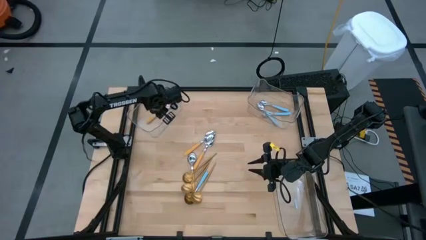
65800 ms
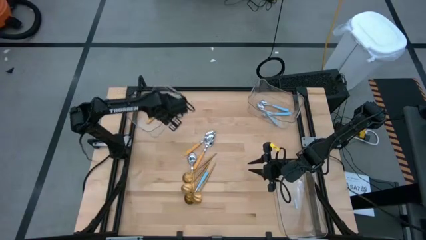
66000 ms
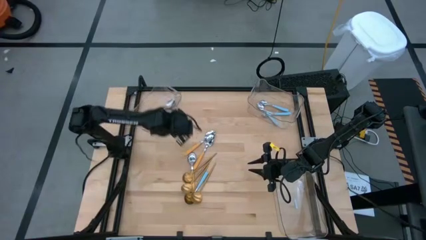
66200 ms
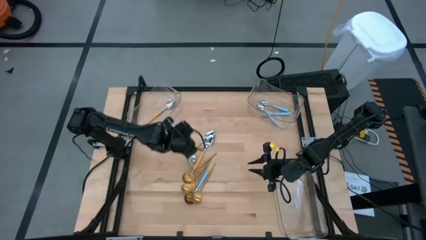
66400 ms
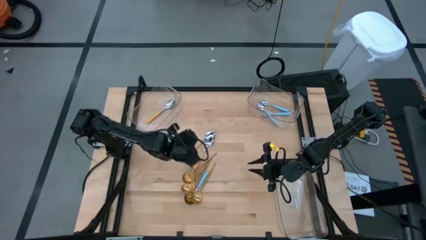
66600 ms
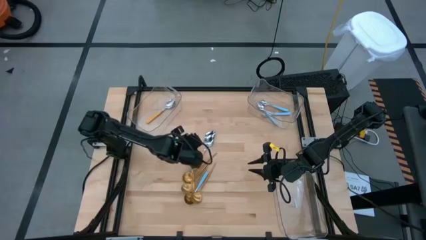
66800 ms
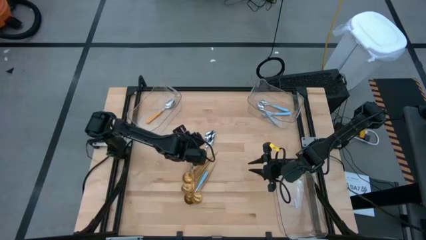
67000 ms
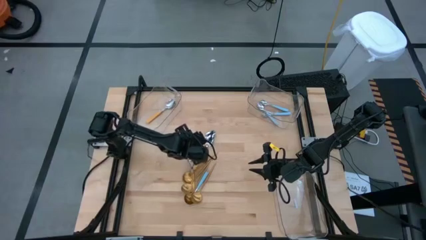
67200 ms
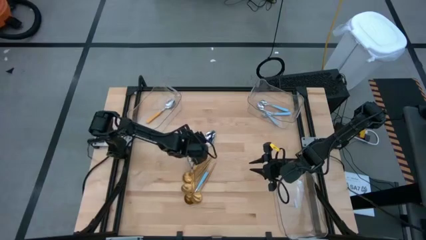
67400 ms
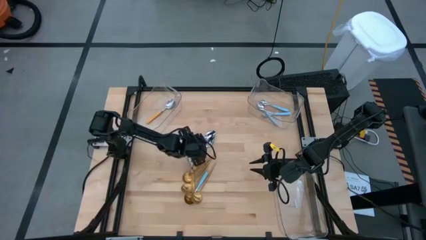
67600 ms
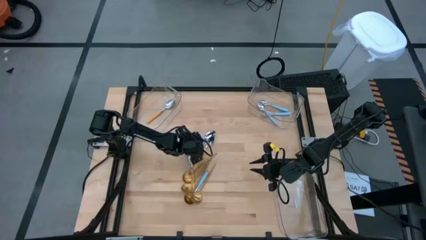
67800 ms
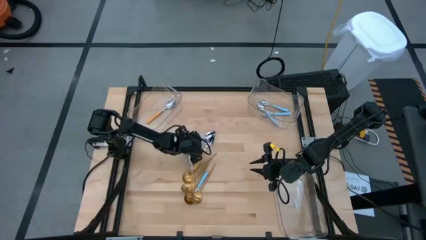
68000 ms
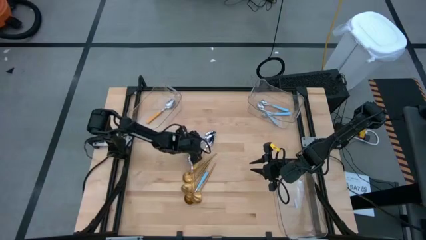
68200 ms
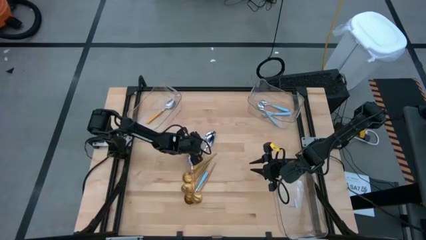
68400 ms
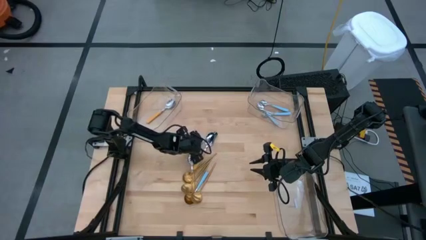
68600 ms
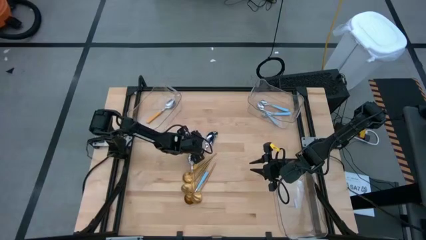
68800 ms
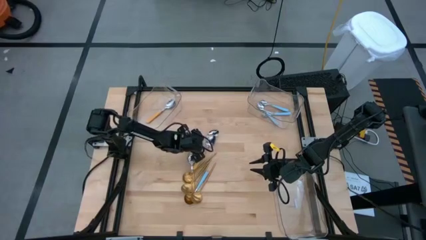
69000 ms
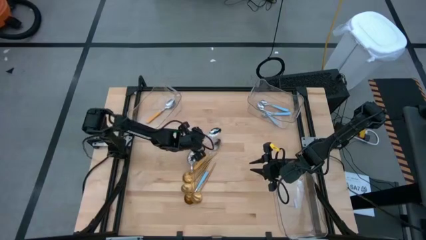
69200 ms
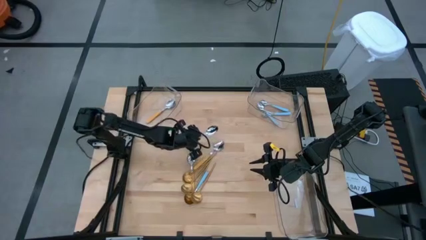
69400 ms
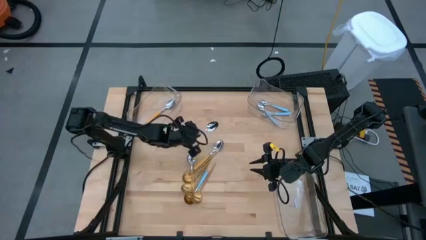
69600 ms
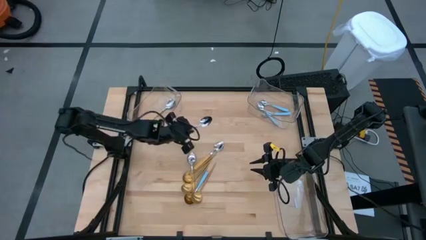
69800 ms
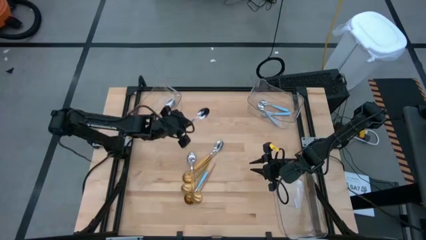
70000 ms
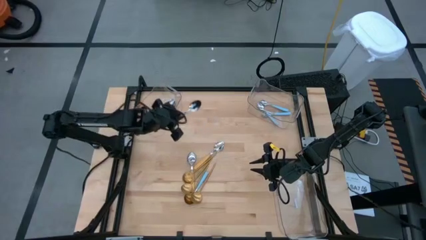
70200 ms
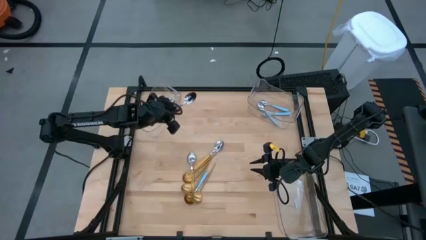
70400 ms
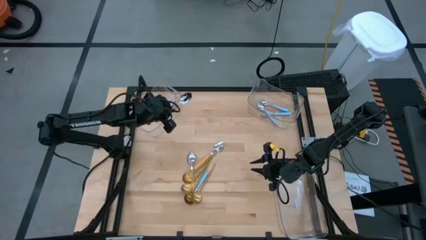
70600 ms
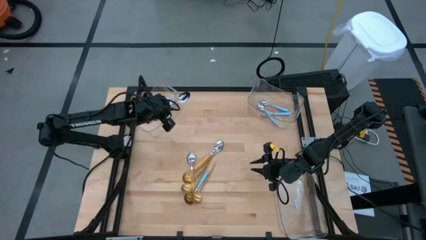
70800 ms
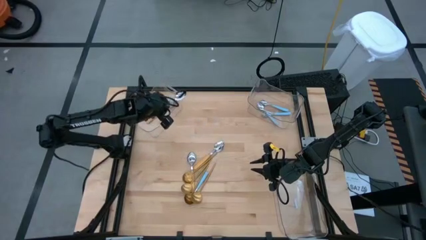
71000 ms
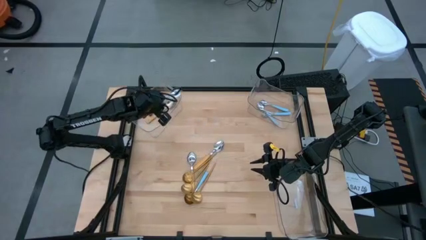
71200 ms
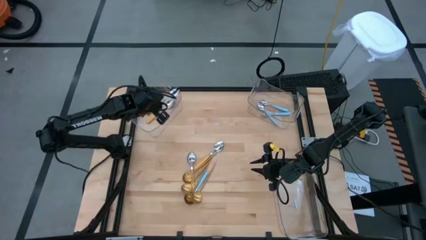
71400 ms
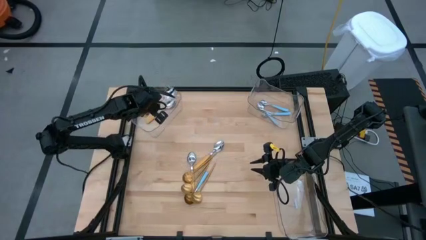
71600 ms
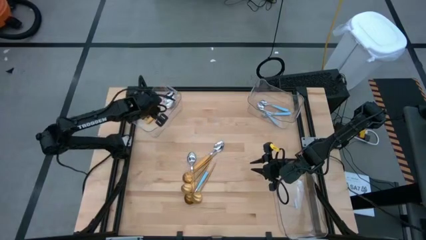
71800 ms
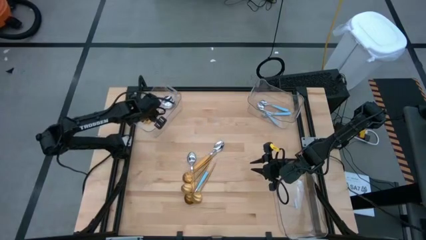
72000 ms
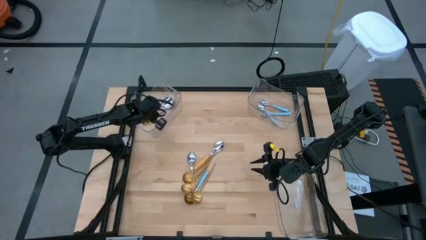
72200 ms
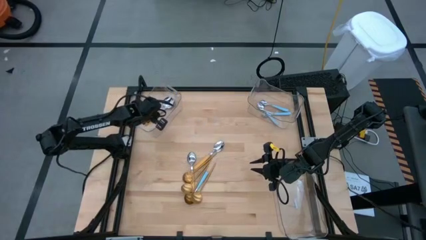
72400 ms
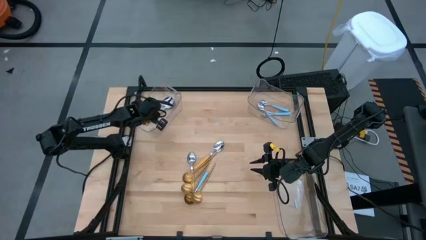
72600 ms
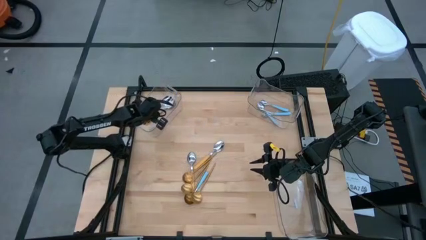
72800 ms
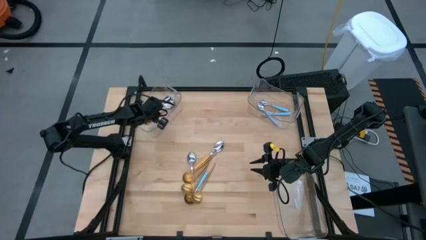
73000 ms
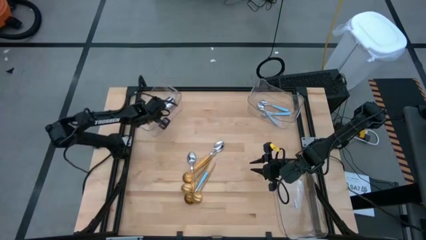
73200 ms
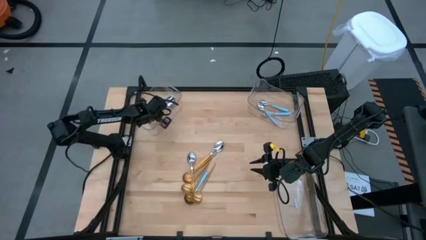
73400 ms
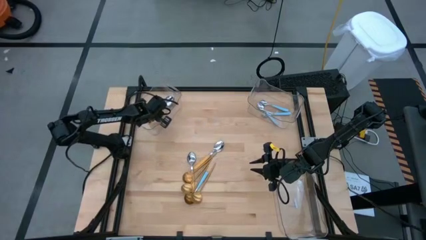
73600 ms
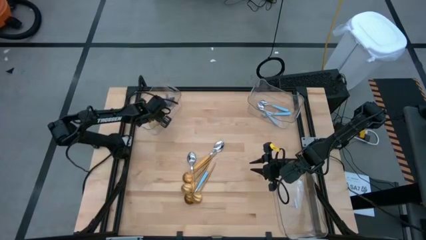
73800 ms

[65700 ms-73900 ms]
Task: Sort silverware by color (type)
Put the yellow spoon into the top left transparent bin

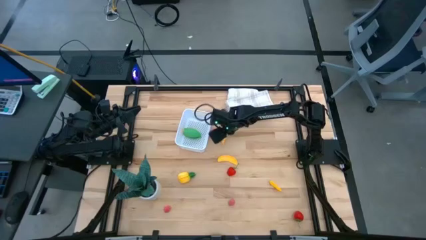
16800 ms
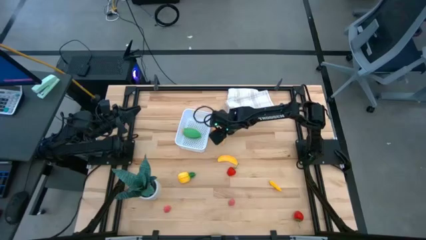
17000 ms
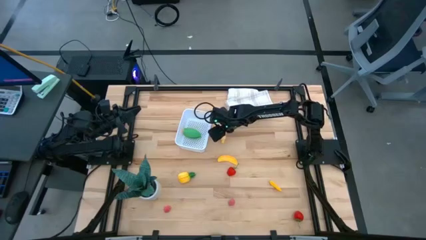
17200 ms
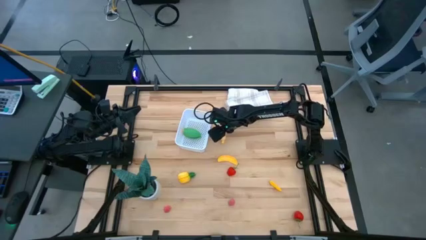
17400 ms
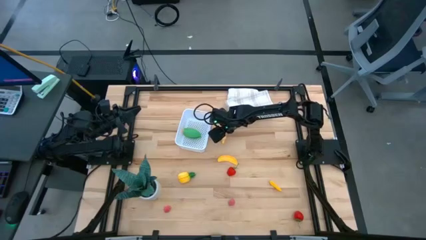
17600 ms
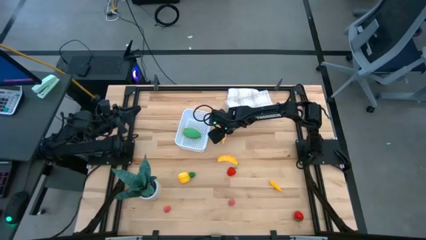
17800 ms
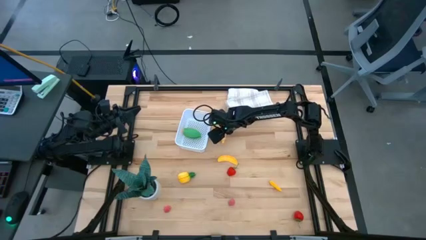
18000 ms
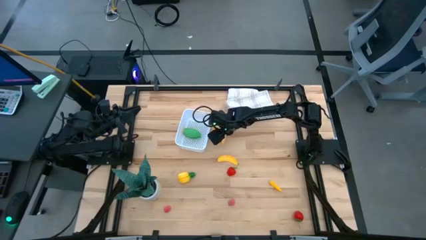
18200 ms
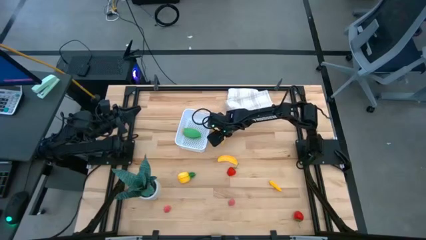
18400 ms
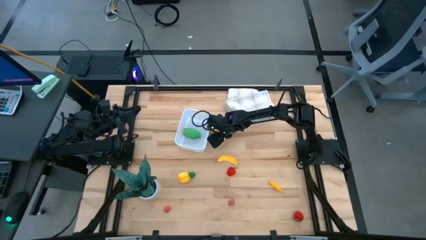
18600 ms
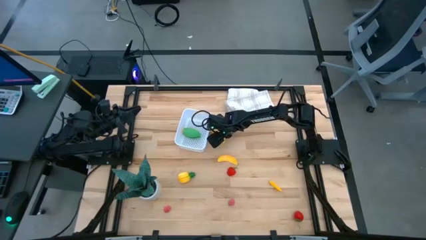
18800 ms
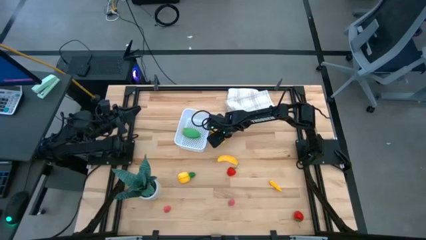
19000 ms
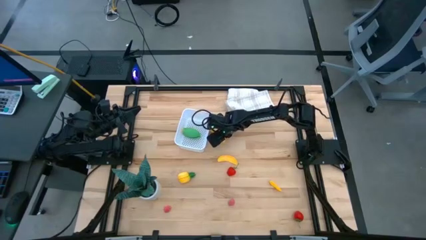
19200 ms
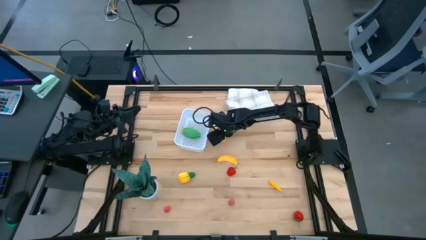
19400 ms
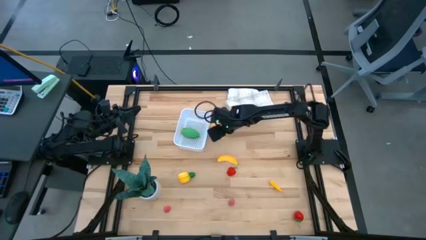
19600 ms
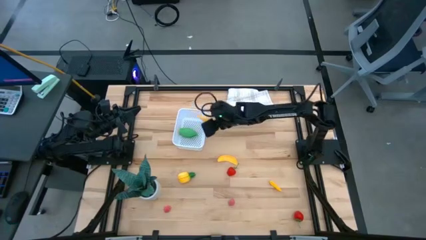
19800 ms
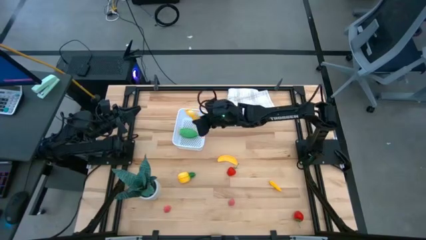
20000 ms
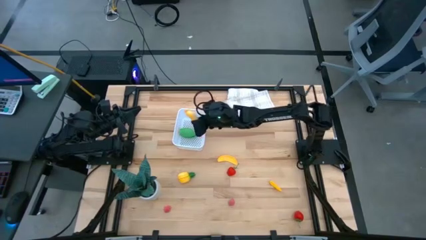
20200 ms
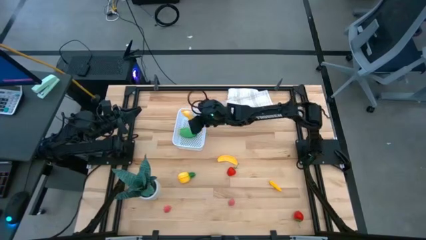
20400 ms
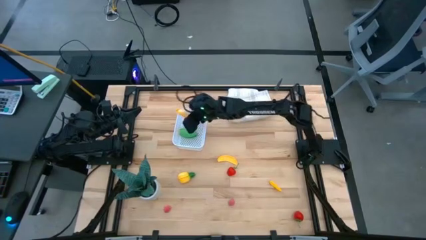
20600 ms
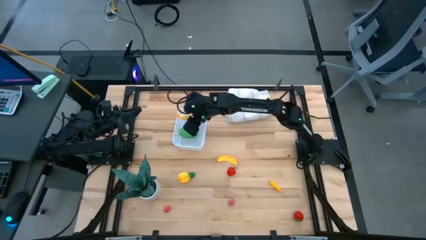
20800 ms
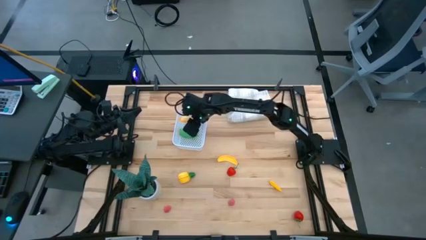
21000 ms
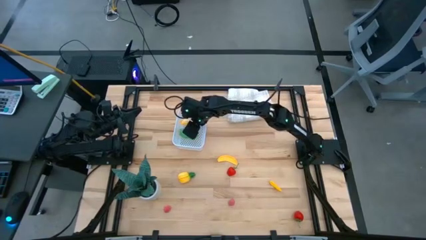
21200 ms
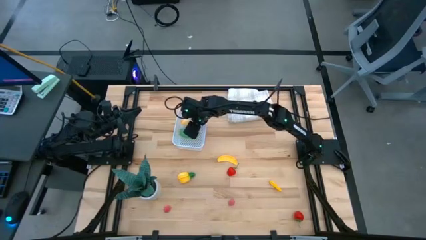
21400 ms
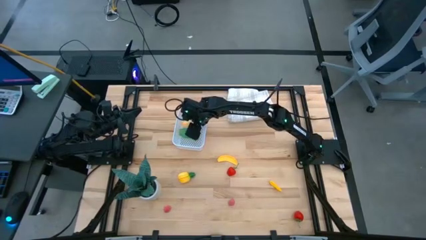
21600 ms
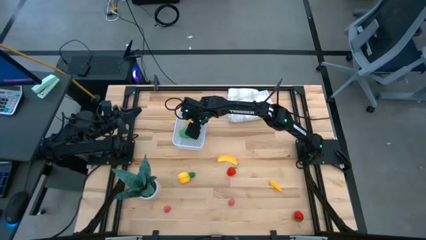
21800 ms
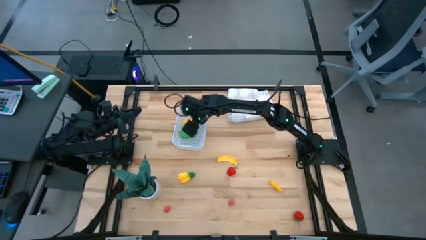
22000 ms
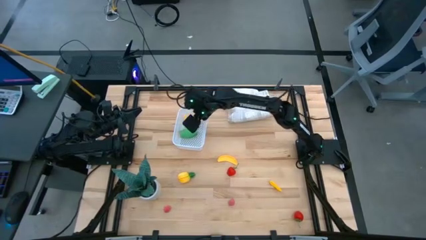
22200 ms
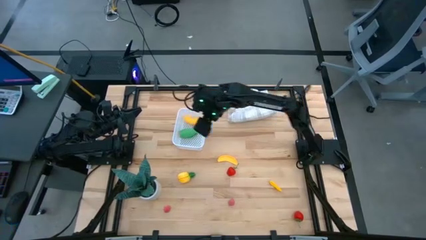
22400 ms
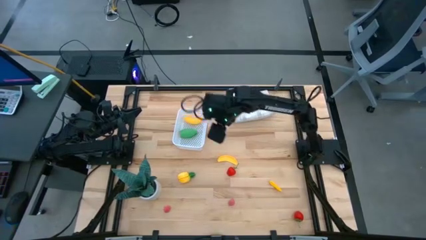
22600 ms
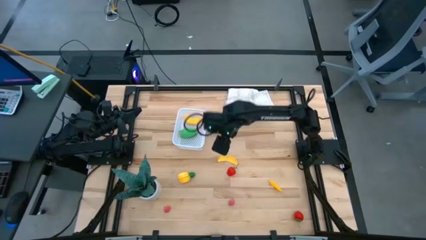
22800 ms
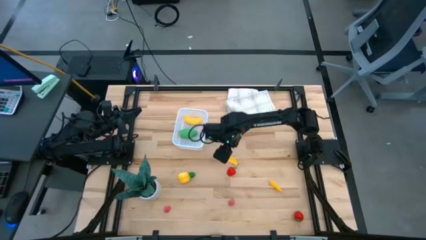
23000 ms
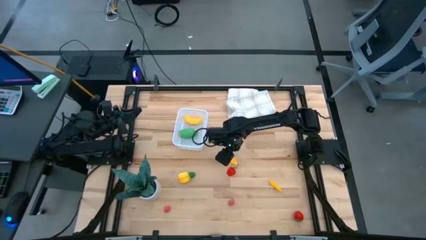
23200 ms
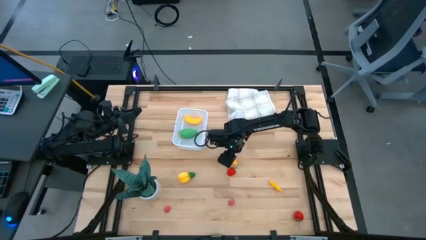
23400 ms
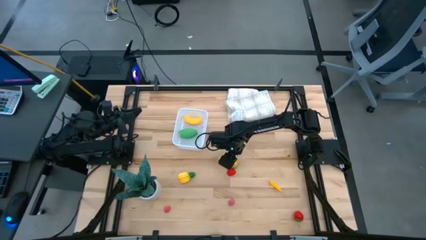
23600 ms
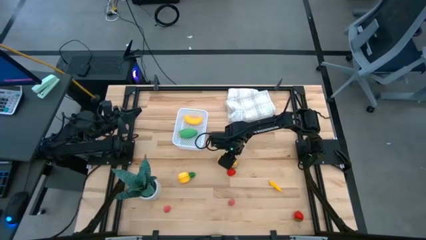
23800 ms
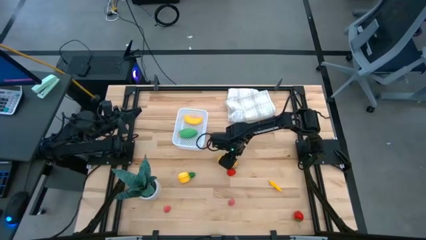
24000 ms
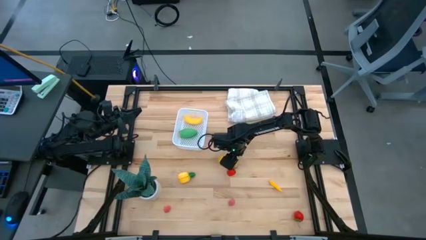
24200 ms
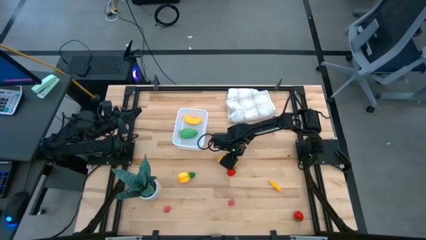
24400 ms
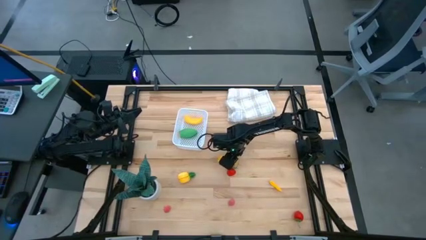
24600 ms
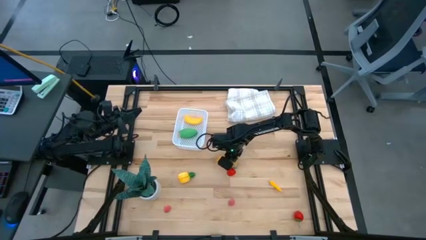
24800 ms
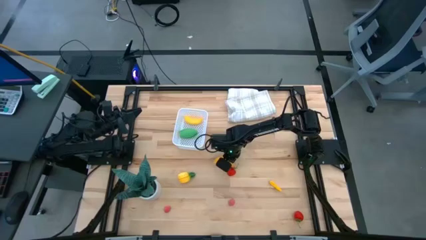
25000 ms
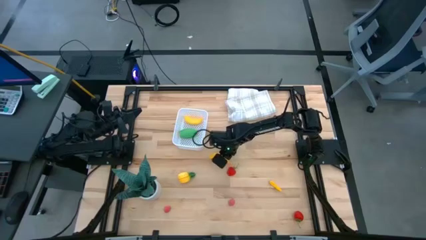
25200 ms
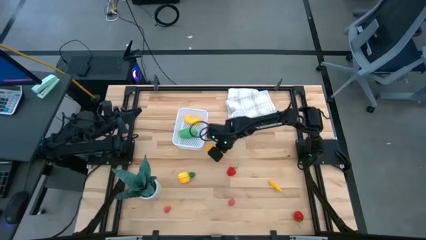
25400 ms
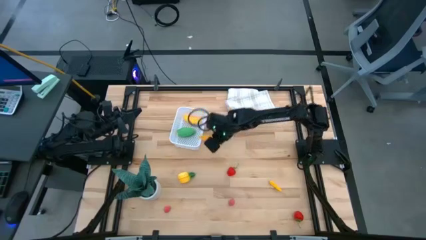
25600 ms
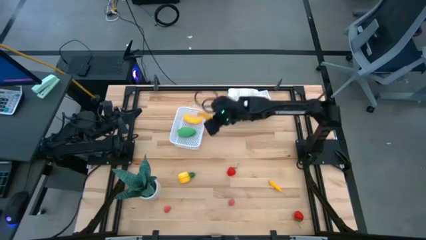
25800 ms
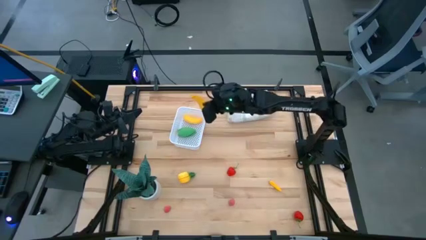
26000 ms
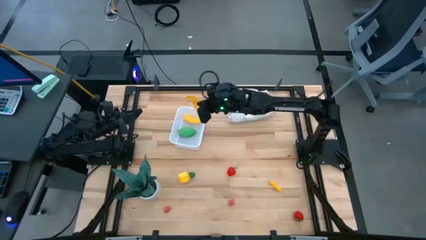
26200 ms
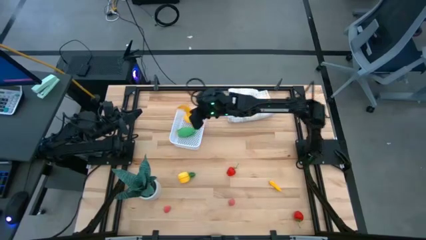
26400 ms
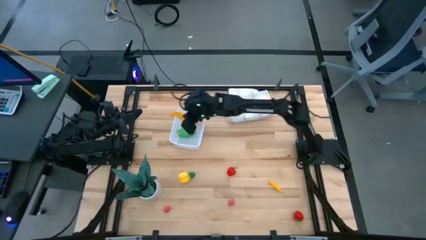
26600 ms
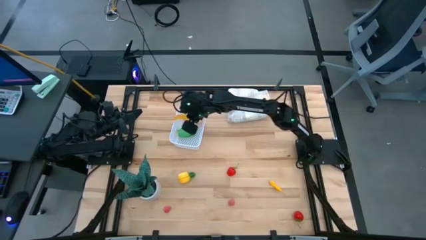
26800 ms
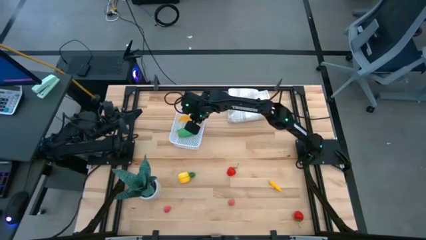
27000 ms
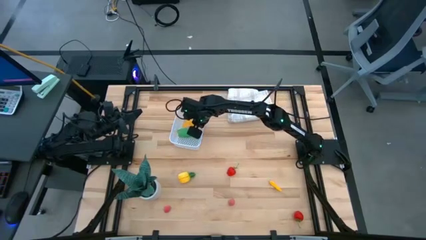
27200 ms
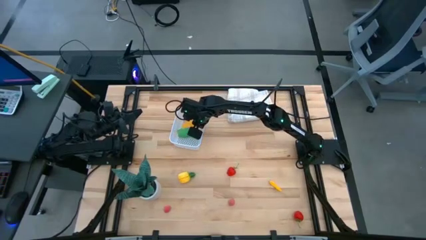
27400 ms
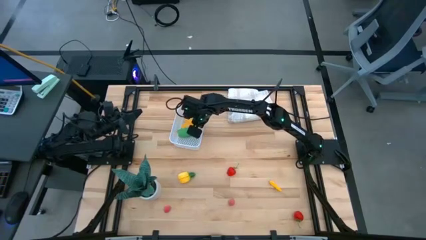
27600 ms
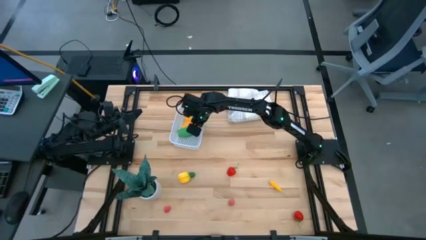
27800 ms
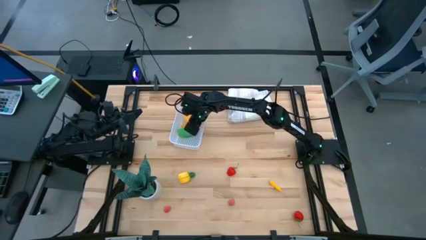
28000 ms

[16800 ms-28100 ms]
Task: Pick and placing Produce into tupperware
Put the banana into the white basket
